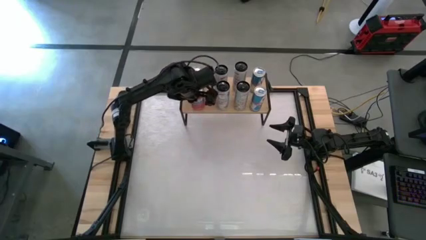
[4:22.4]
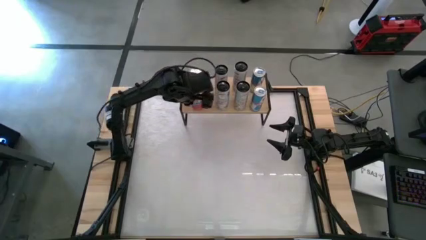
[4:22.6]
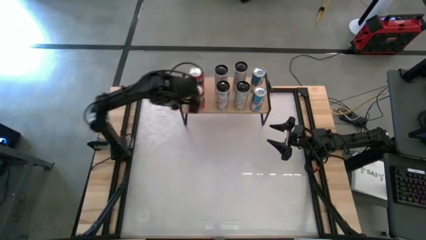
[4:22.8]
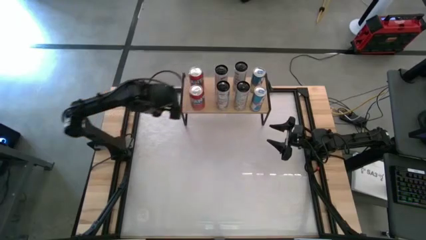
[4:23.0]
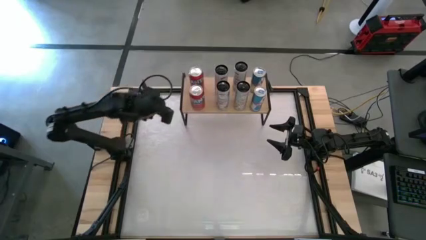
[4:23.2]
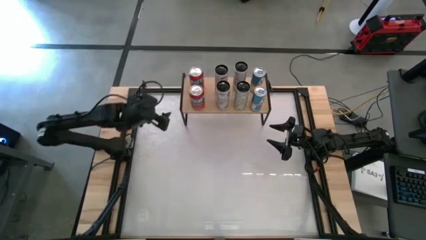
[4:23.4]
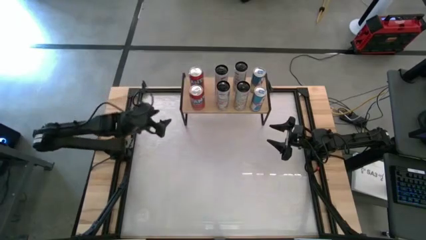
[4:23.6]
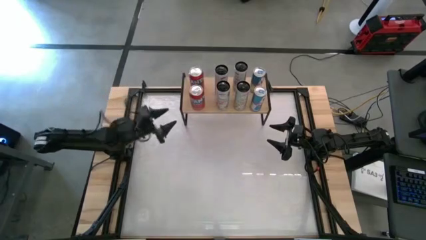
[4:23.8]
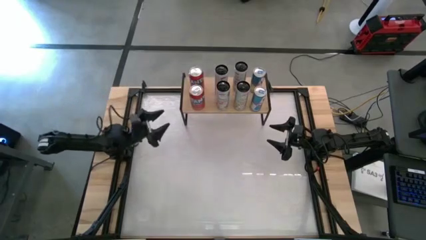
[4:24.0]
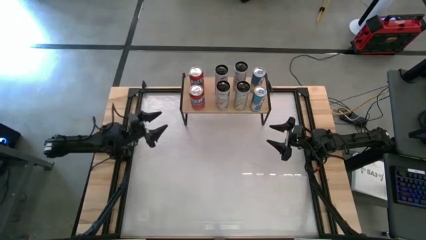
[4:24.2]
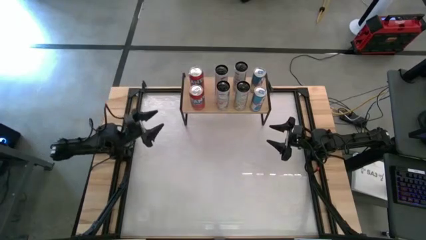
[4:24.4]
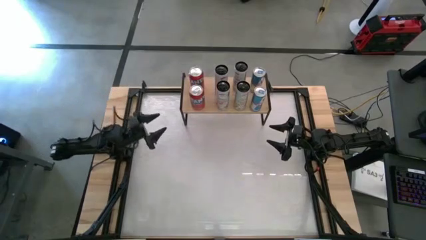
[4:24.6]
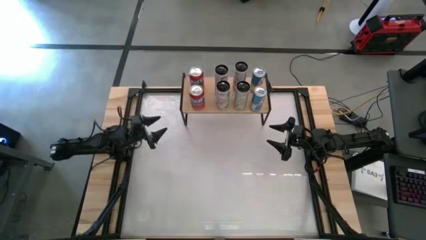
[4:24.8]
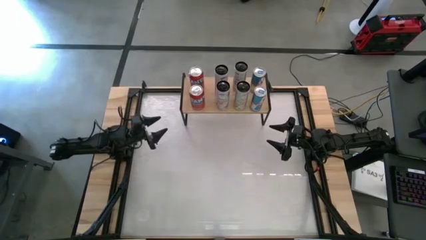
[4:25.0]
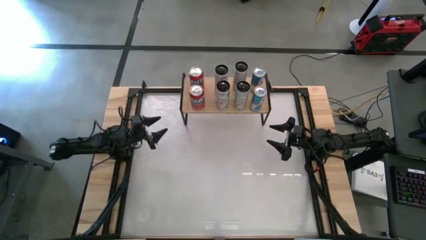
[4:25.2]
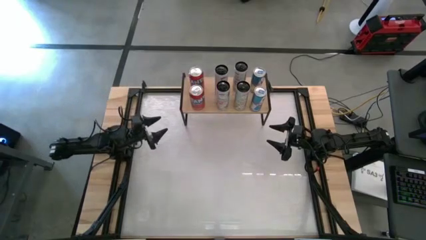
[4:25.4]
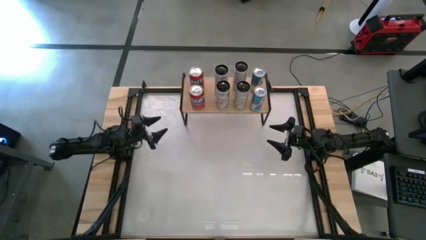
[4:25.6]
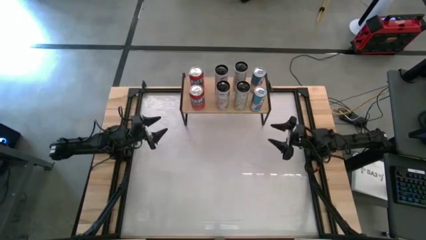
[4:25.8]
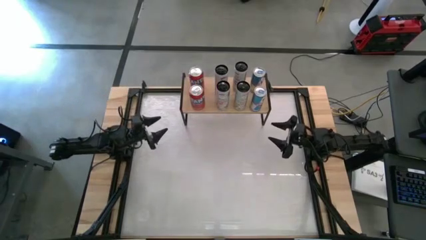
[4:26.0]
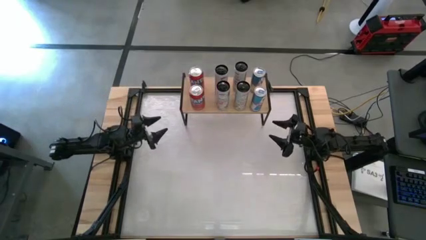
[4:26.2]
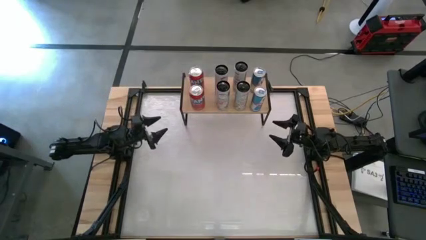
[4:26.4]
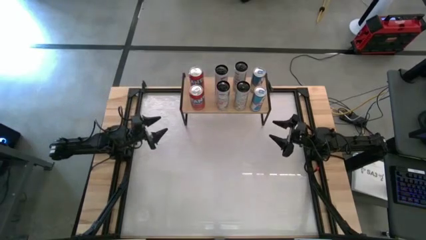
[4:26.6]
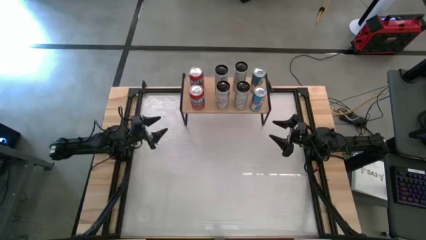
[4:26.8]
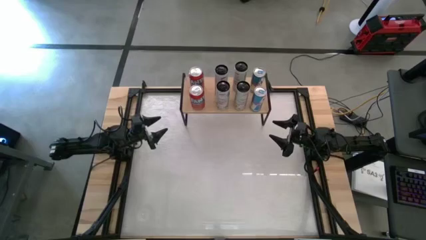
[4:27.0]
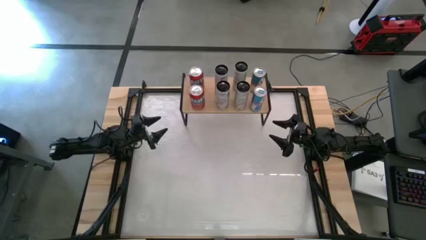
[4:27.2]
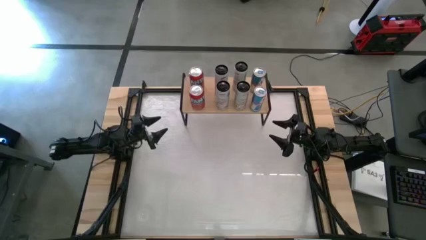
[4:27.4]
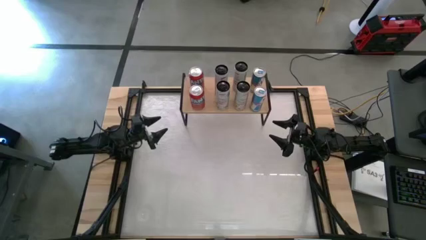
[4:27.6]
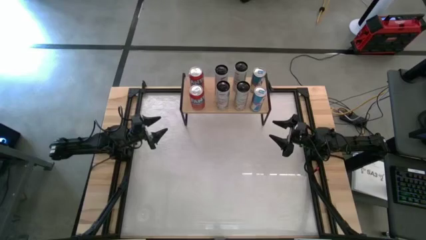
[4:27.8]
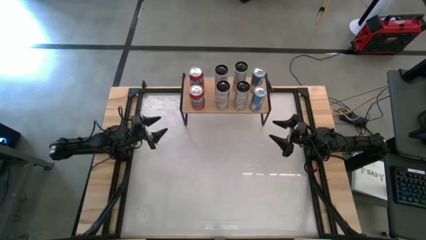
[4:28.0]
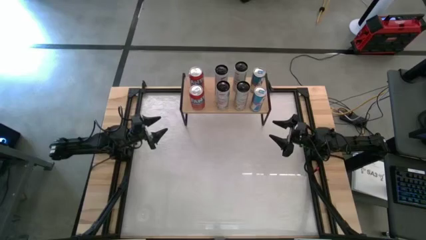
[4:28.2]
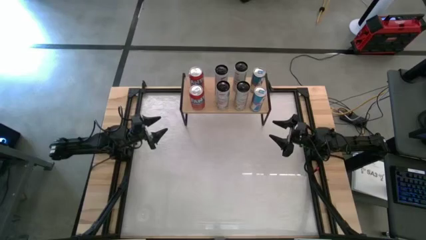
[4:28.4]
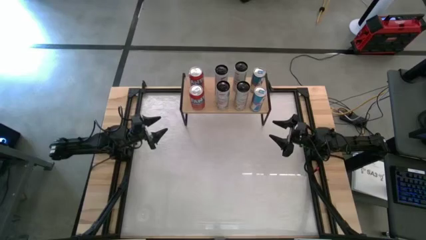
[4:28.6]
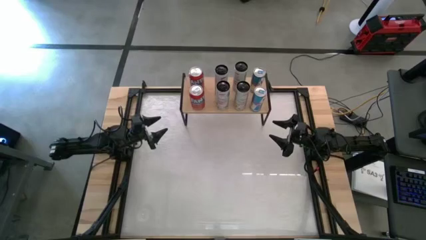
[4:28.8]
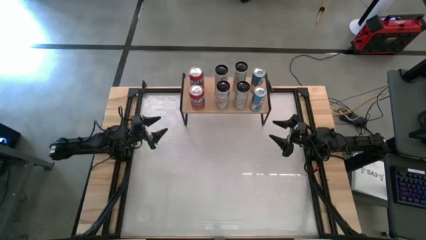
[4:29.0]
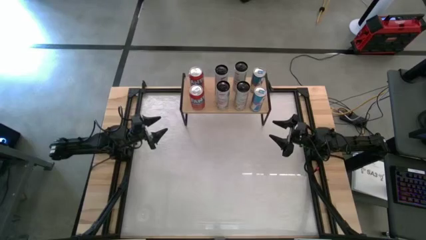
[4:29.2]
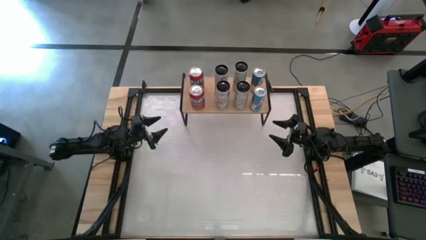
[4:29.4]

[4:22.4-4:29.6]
Task: Place canned beverage on shelf
Return to Home Position

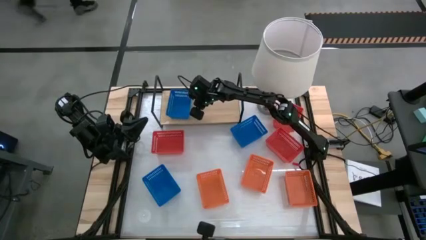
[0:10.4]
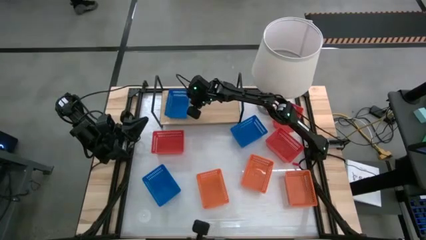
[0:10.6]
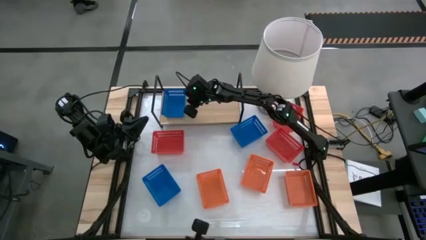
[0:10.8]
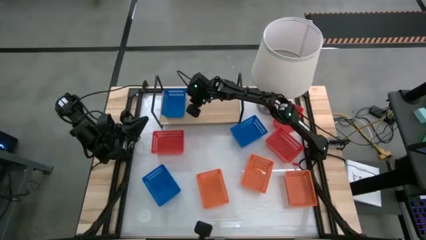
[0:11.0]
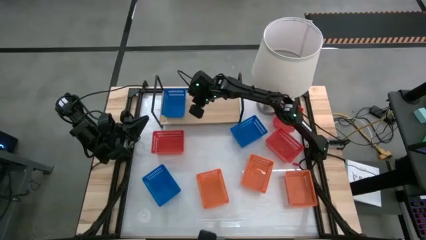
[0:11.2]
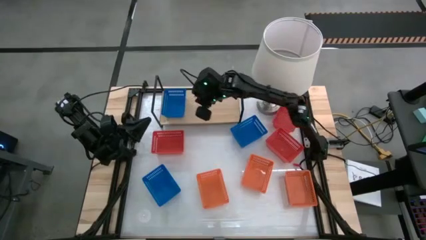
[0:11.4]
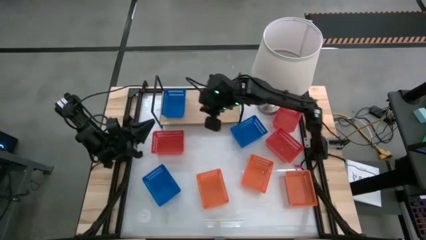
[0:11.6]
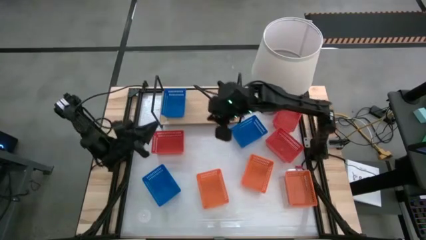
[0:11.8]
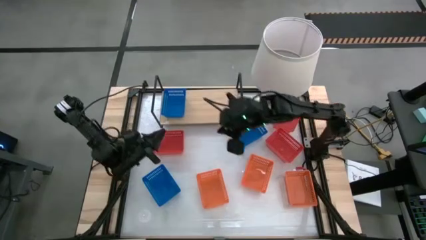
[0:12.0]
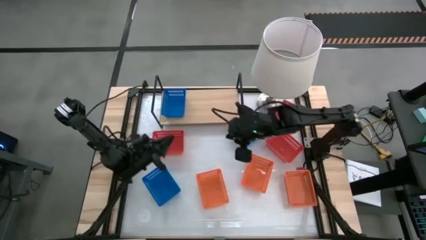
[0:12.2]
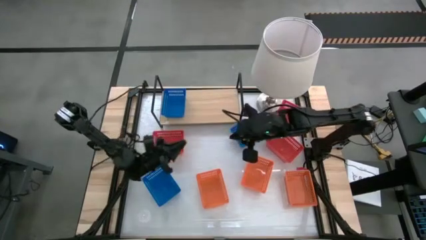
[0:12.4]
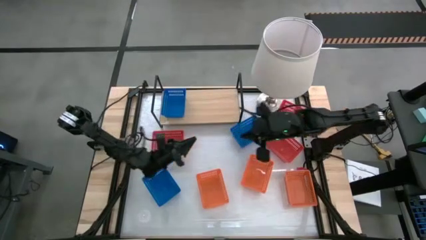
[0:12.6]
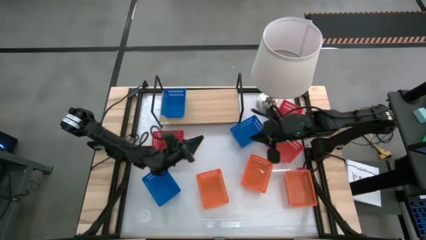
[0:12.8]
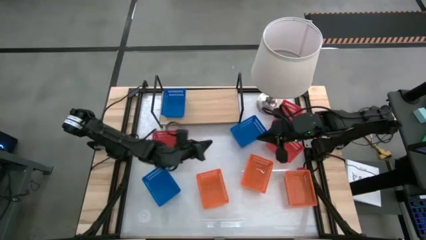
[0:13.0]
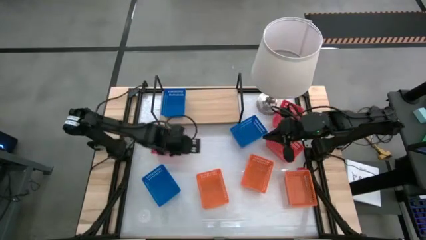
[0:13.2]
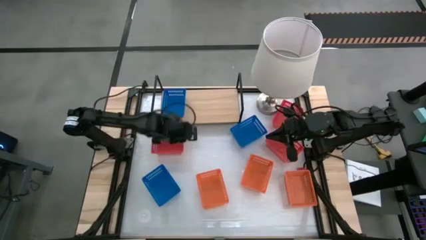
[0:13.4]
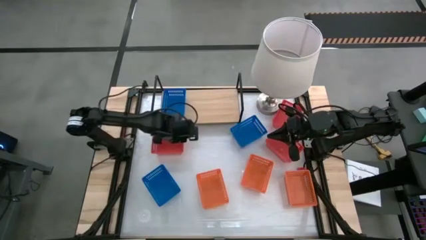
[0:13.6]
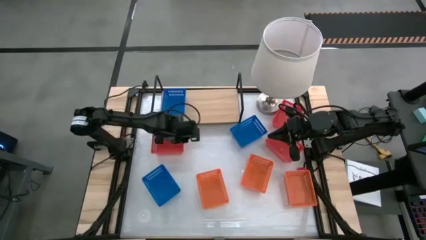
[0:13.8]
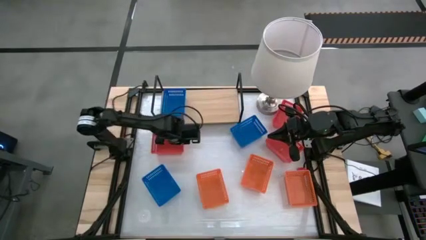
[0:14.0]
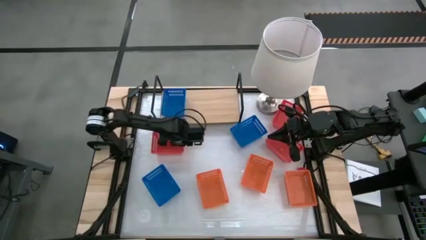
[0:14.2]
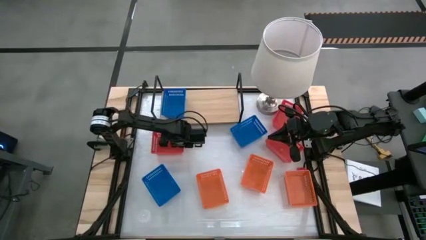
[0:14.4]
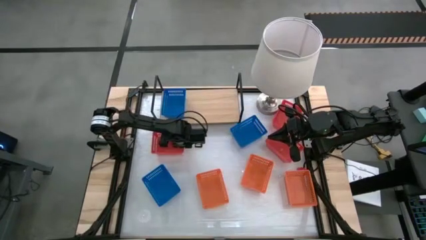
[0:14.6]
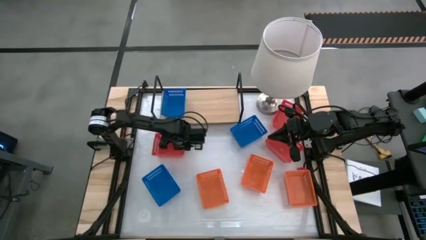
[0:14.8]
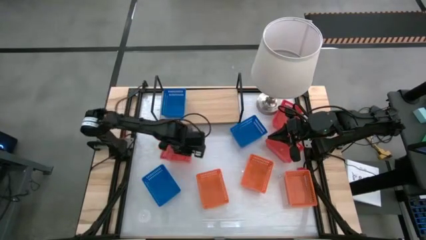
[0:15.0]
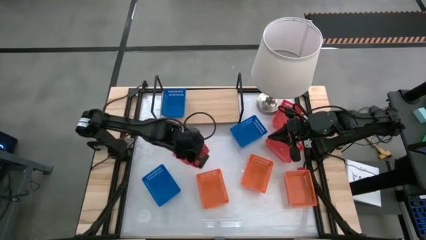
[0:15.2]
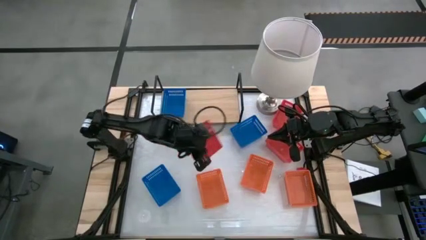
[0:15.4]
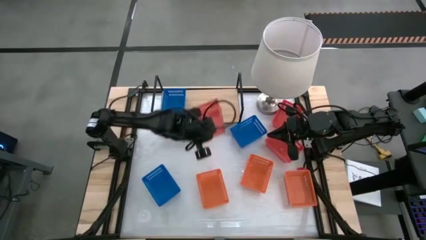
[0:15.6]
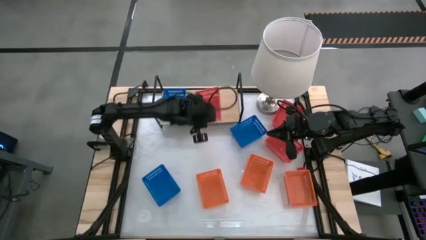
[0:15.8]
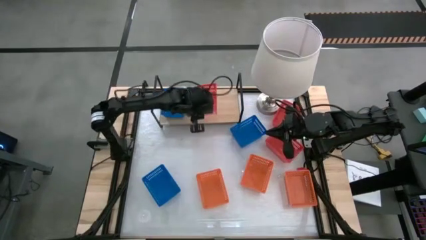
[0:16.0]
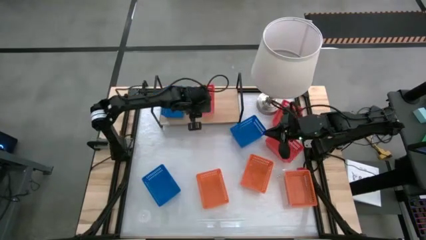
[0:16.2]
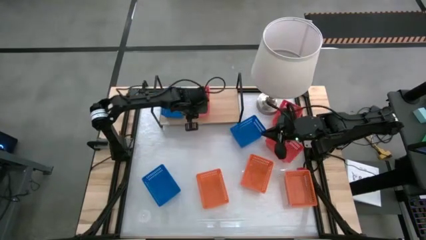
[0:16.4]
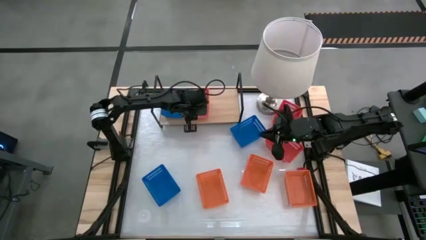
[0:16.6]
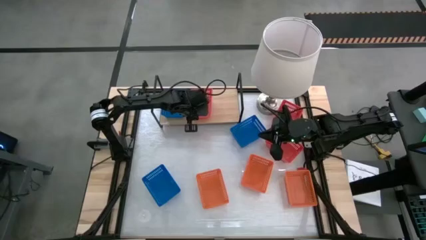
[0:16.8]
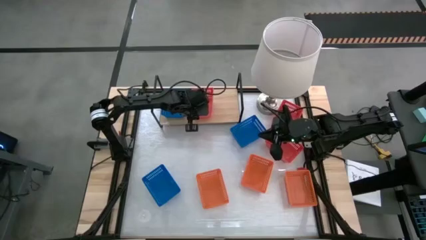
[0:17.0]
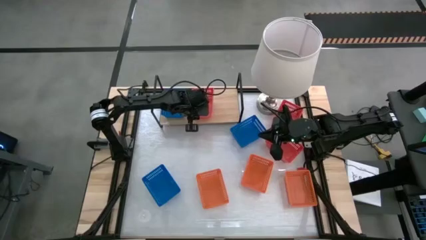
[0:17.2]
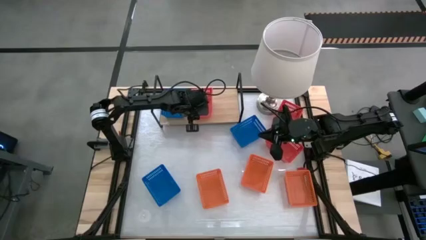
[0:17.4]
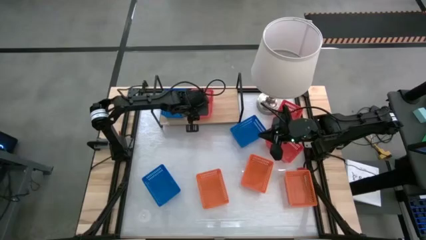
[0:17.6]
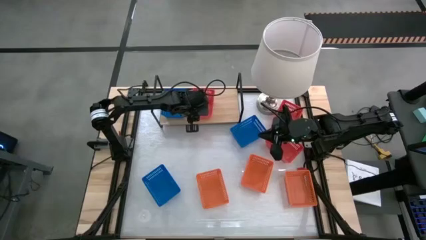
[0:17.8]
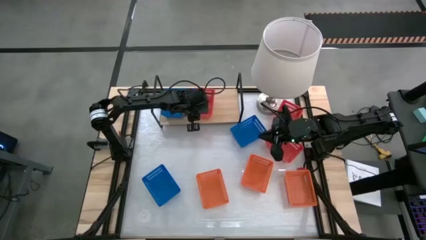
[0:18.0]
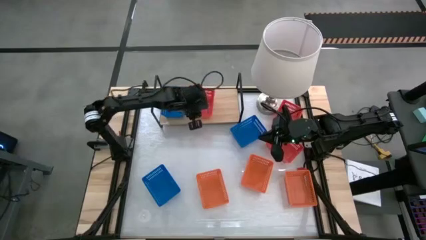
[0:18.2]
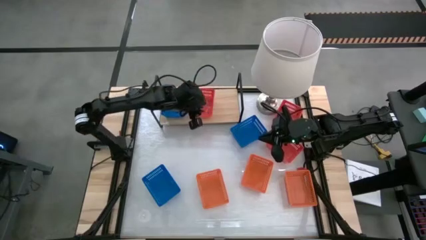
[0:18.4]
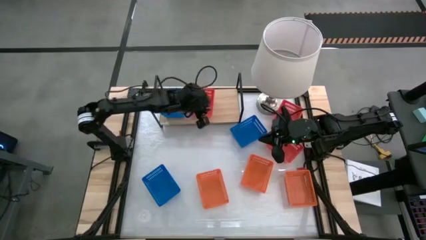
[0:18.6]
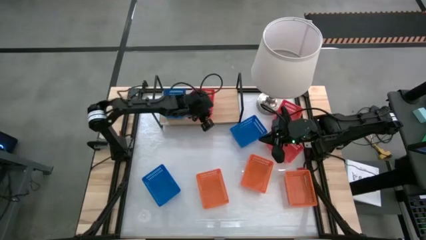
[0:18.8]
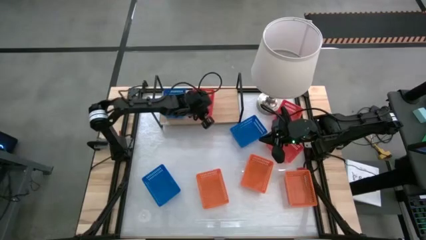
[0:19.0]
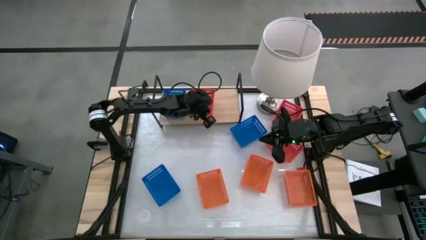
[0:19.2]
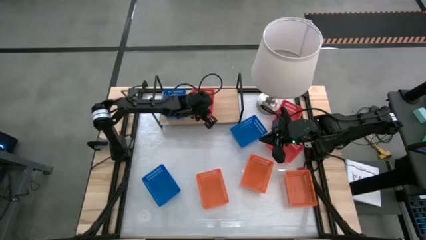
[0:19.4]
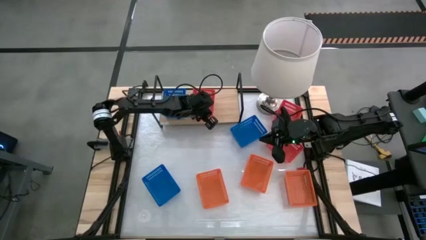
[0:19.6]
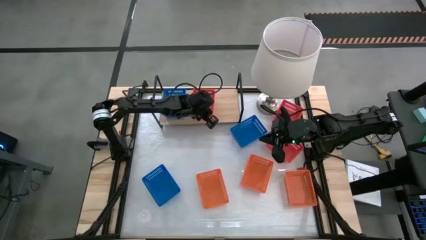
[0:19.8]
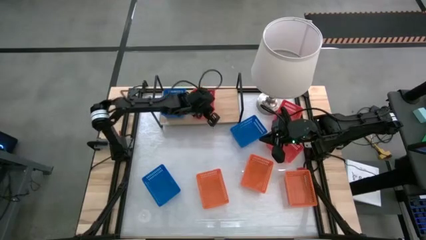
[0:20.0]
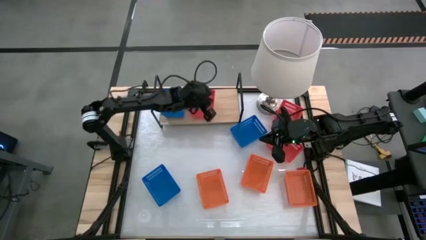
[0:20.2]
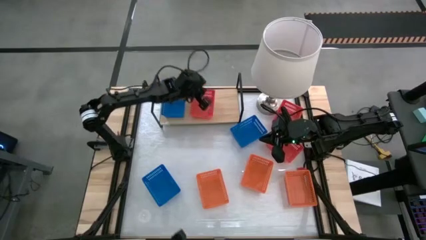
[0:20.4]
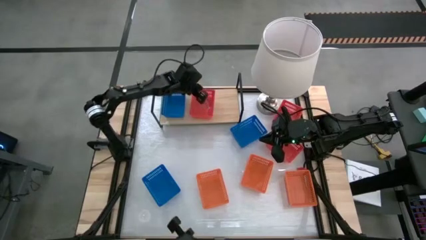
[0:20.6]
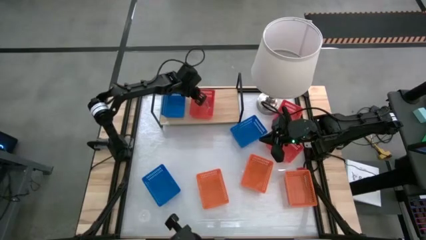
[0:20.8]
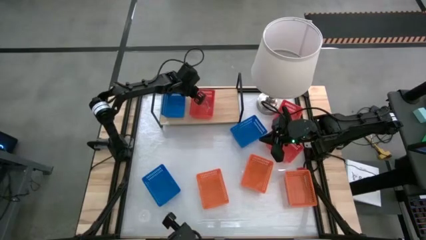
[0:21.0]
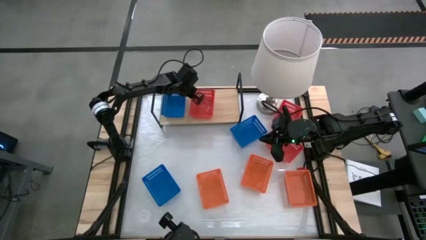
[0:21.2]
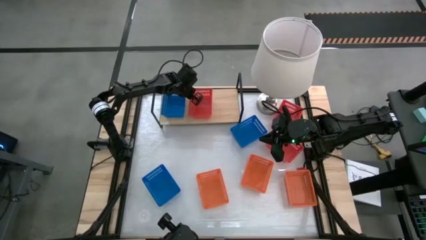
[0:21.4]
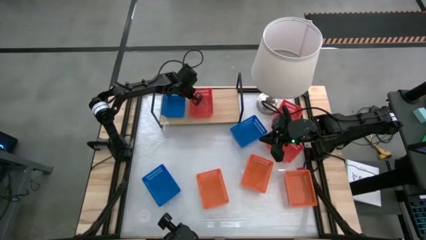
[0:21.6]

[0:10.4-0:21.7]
Task: Stack baskets on shelf by color
Put the bottom left red basket on the shelf
